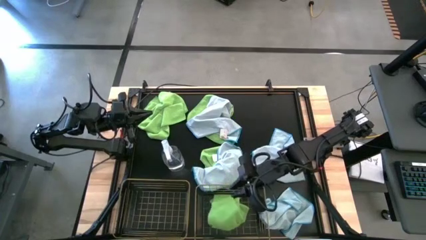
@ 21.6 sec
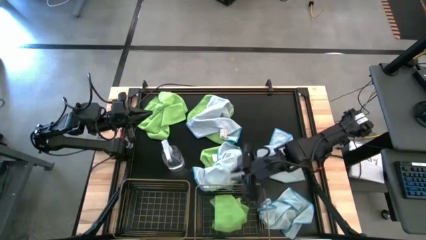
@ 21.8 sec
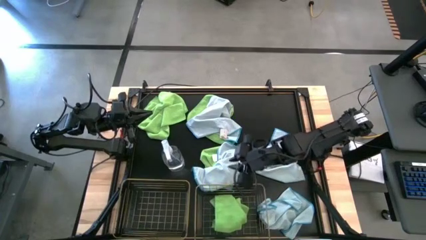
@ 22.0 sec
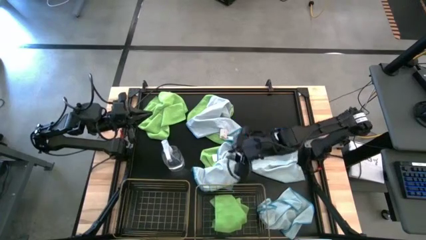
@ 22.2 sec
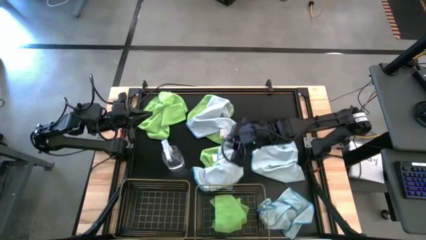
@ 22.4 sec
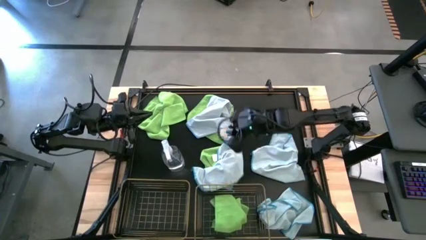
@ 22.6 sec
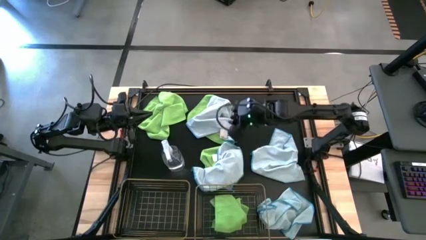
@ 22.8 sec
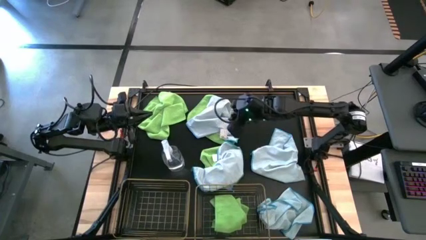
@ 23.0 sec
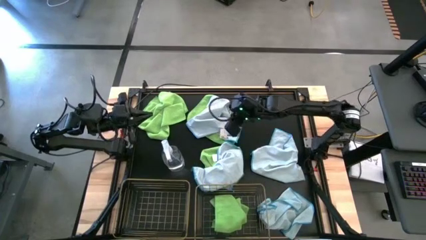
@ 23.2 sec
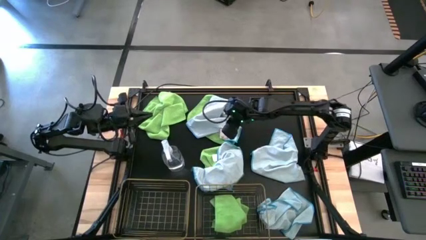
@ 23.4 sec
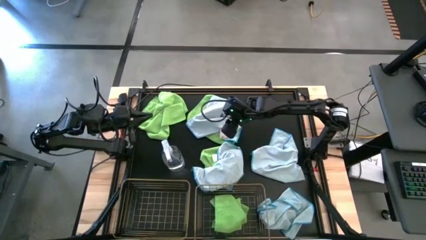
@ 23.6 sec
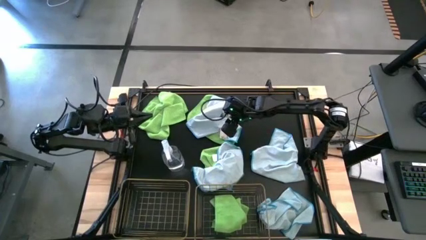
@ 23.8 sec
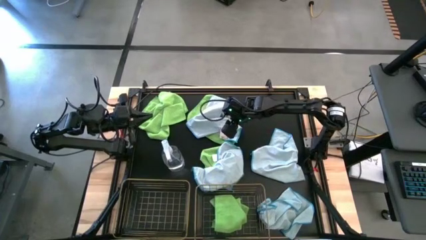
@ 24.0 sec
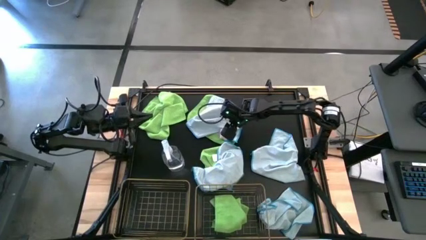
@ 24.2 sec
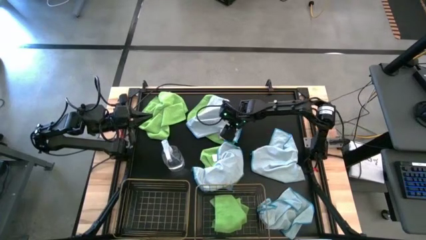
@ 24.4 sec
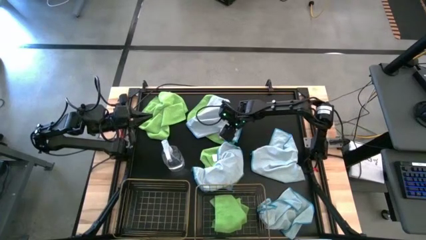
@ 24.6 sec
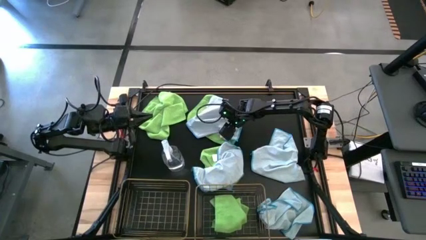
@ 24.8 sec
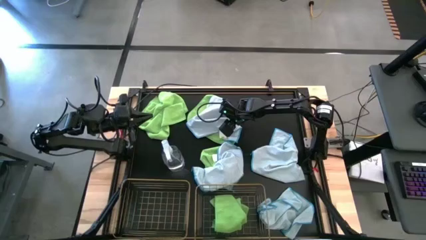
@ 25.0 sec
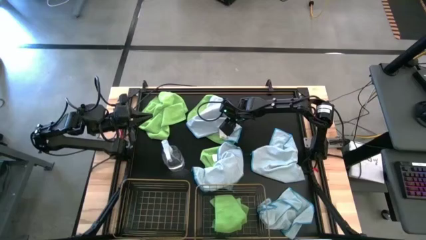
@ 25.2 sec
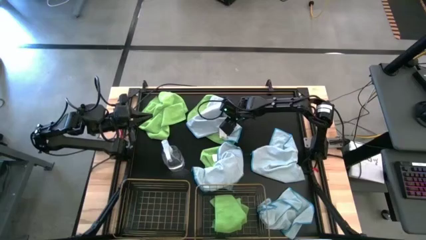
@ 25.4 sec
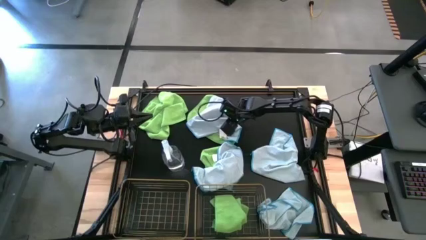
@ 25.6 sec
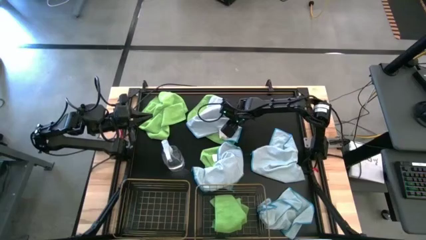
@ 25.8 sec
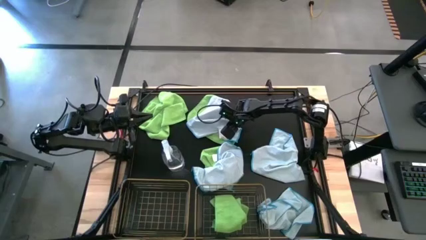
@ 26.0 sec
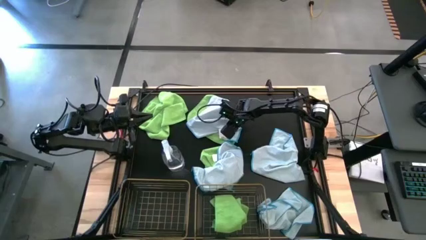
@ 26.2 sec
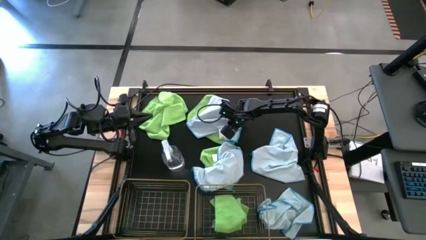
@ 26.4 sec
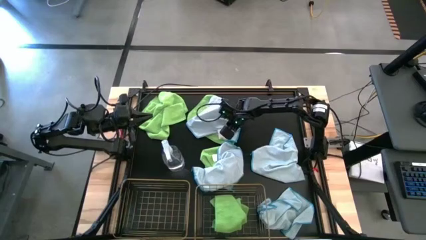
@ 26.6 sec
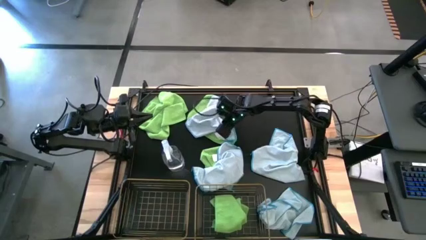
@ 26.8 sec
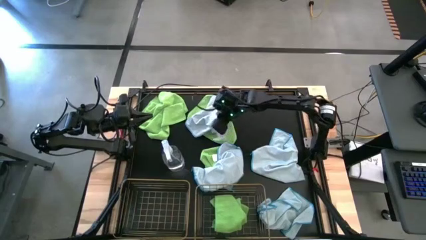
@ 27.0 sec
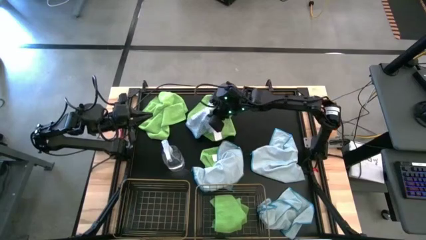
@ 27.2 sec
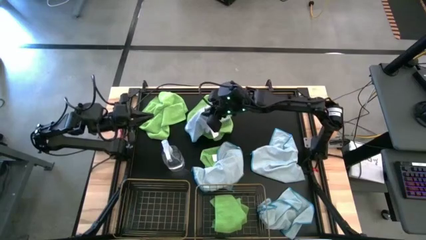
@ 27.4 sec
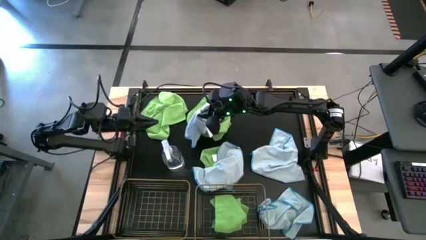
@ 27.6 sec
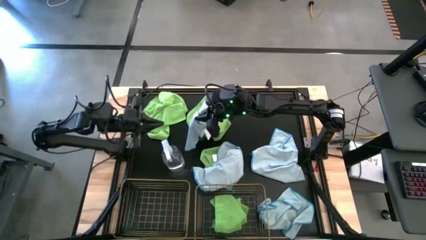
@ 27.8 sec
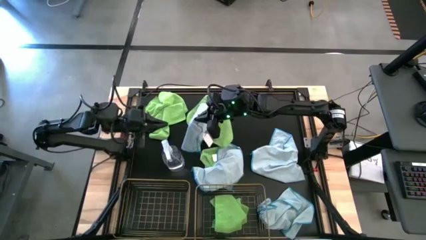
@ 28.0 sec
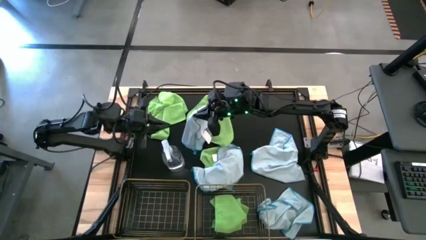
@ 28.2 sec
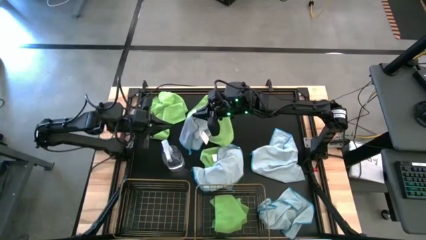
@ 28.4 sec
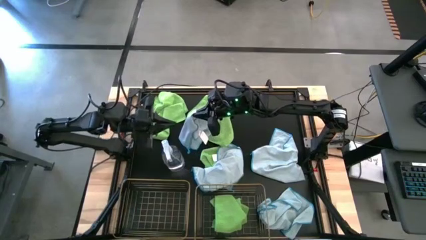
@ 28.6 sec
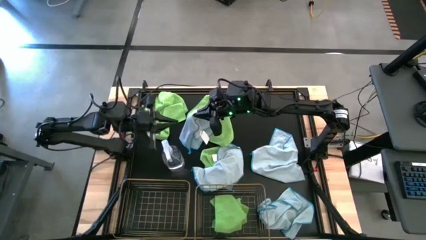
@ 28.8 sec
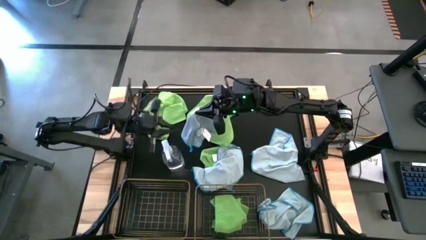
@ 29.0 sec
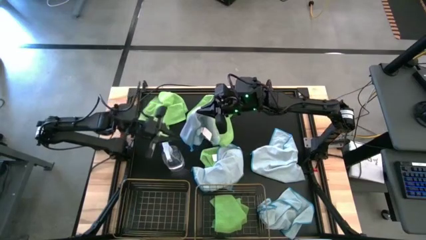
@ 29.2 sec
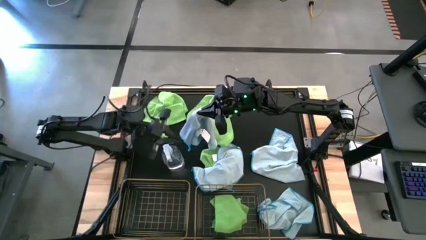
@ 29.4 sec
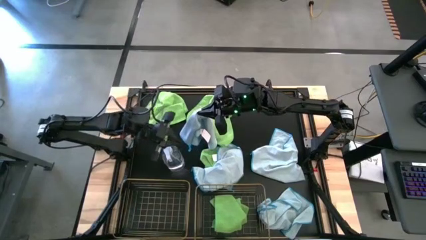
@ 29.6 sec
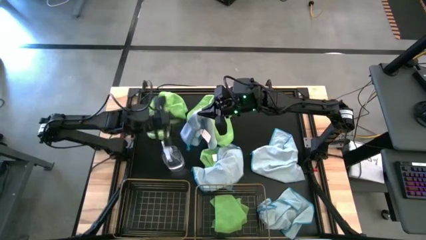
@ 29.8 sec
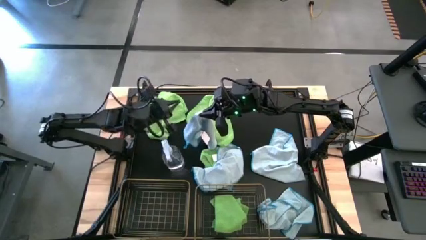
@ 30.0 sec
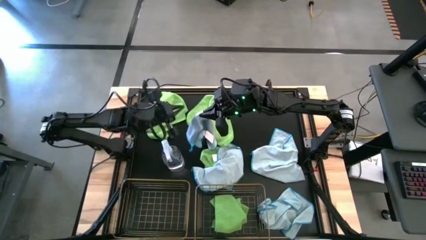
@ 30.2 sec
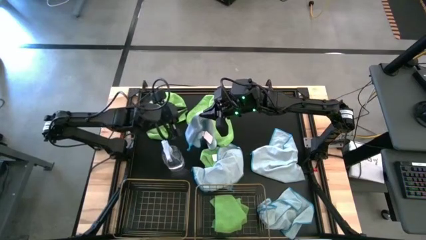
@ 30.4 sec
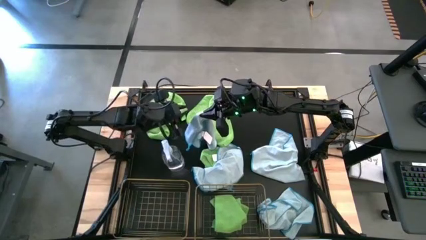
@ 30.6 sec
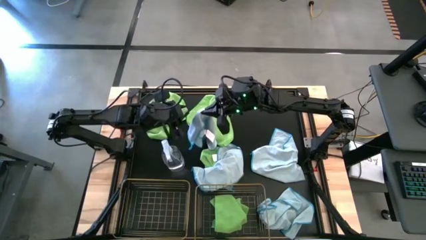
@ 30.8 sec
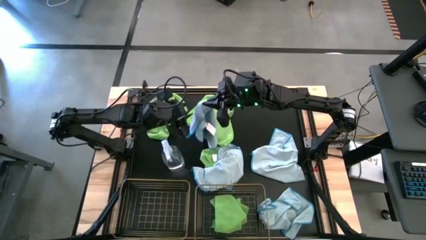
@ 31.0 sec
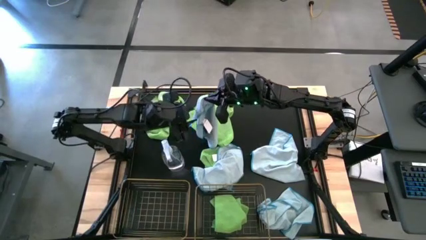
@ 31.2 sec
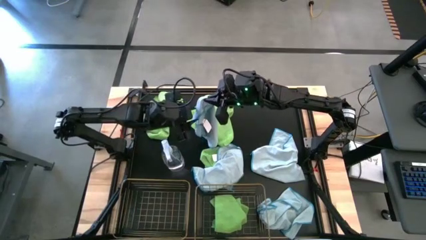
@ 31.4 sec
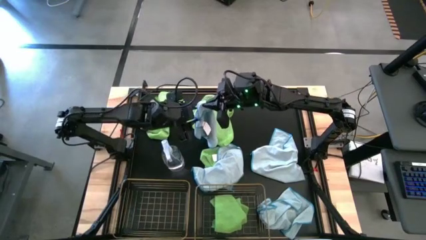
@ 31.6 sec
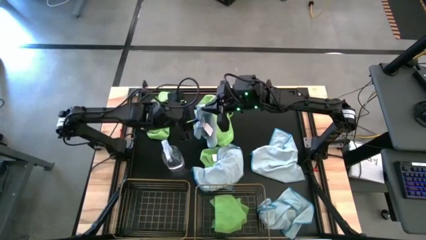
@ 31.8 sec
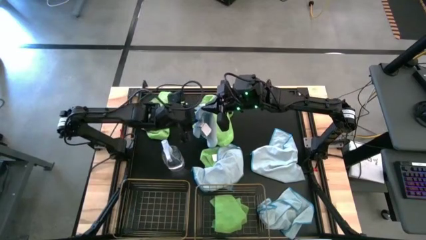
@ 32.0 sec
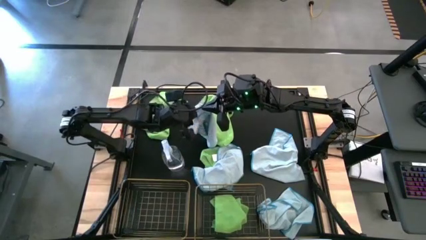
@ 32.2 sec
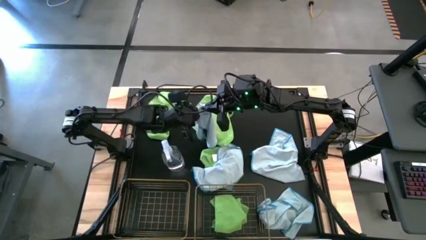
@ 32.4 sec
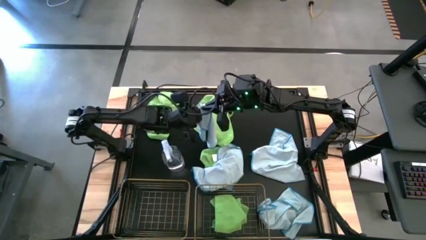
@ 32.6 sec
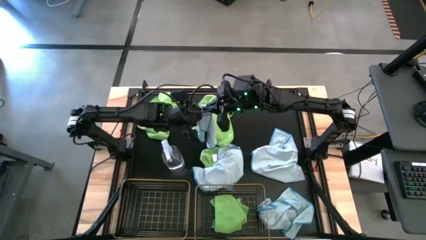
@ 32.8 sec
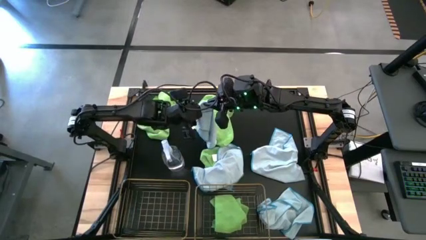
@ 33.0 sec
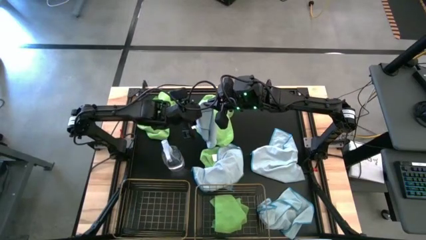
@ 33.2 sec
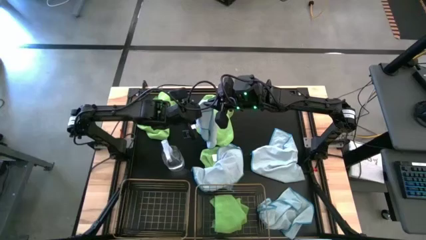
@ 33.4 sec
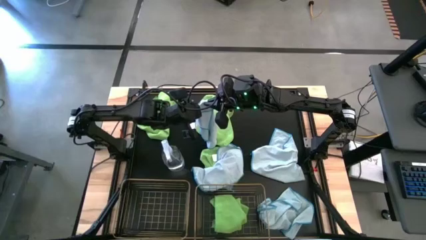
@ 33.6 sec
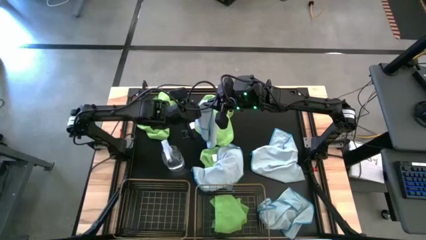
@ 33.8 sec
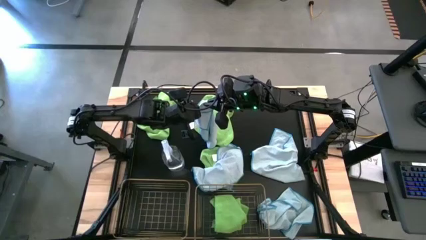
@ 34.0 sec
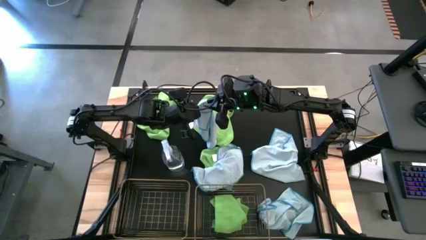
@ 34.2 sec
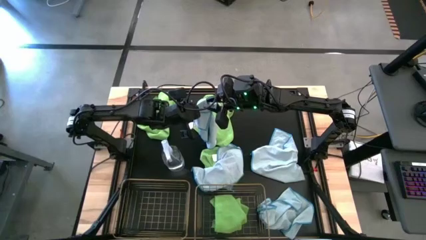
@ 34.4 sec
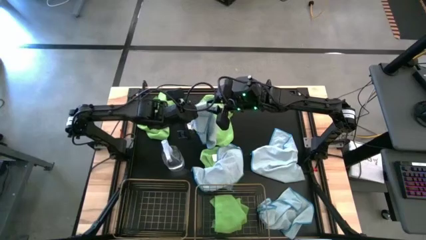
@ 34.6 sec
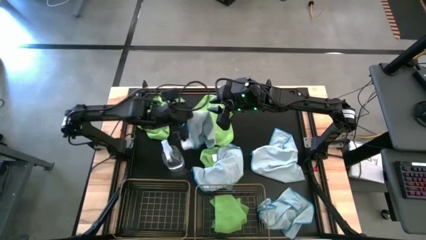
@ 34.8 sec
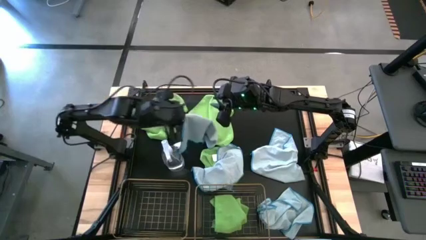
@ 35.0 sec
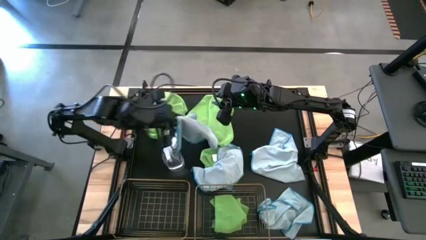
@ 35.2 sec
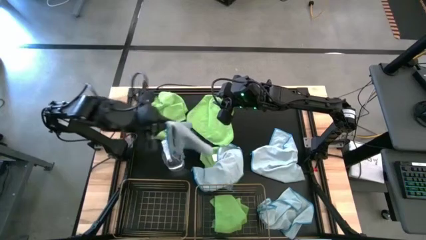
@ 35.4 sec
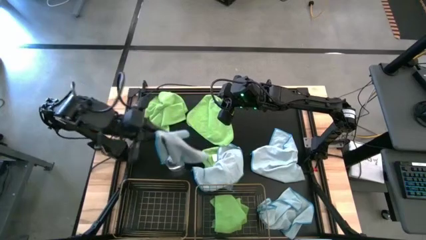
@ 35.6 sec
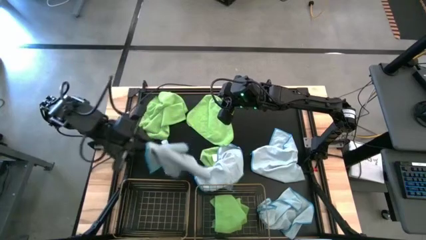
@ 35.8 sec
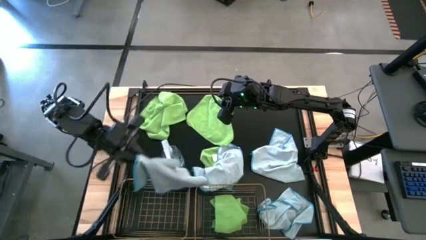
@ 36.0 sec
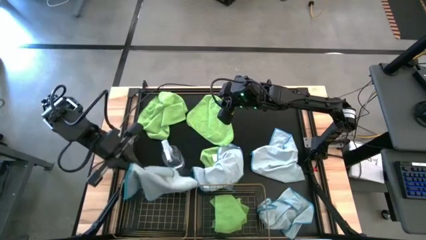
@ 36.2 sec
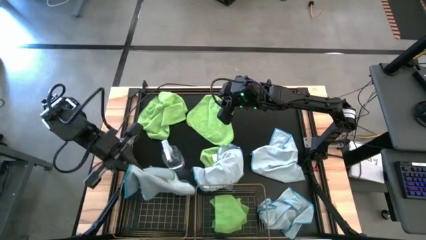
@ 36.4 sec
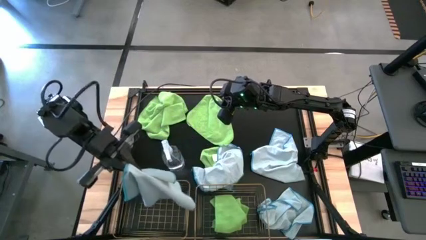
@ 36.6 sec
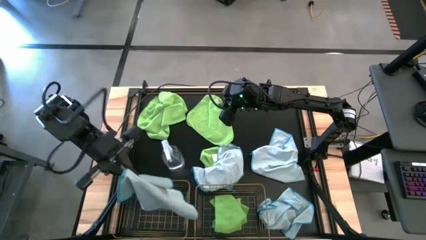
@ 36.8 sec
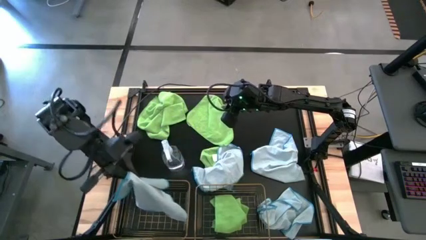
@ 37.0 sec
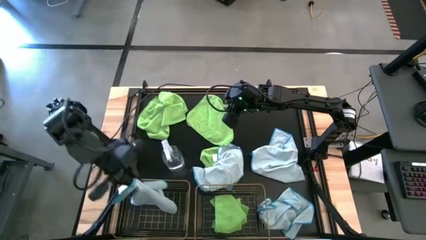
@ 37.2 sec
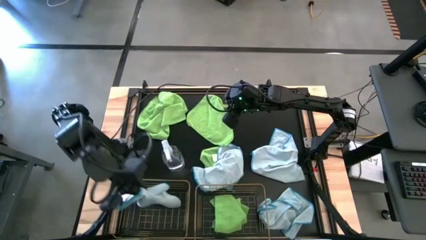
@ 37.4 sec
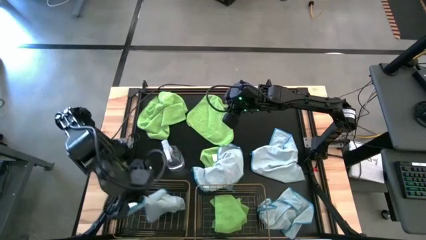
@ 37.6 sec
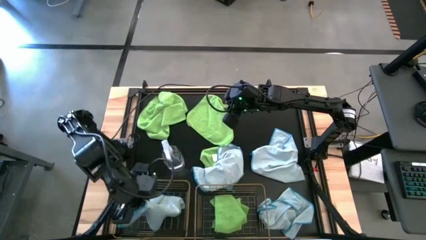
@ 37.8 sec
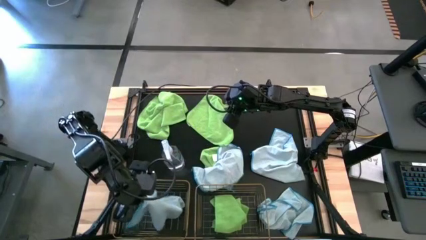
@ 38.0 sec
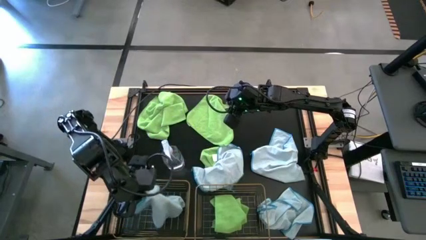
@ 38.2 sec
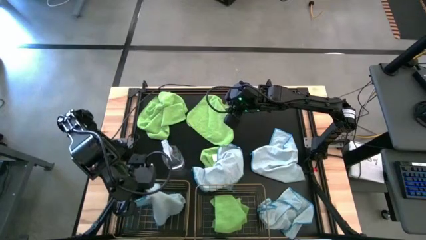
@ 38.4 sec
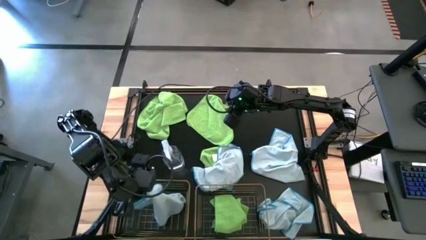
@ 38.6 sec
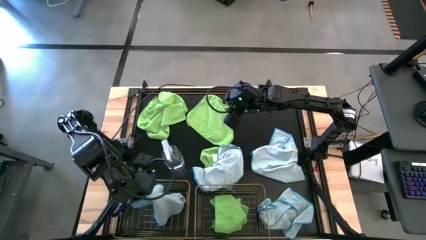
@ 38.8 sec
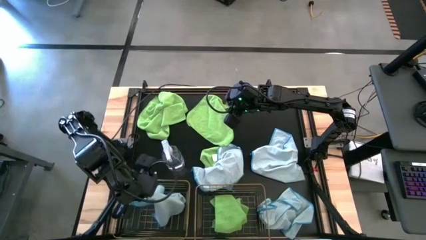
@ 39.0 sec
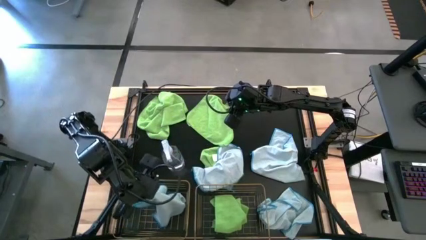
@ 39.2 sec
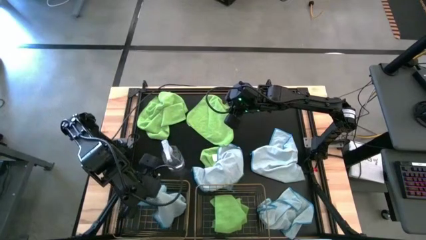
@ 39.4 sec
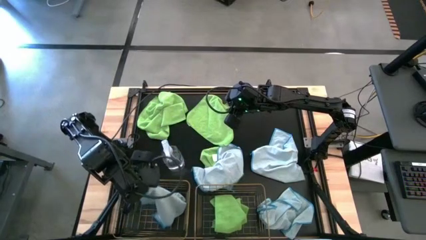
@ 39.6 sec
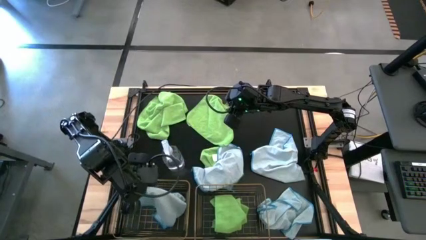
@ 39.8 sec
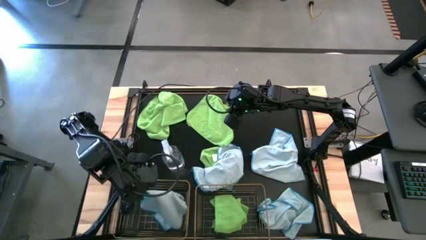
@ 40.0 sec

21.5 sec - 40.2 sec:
Task: Sort microfiber towel by color & place in baskets
Put the white microfiber cloth into the left wire basket
